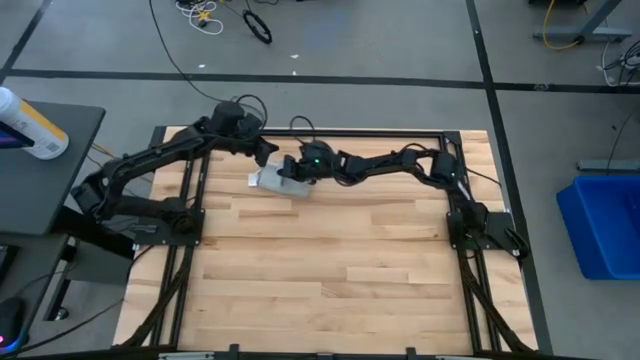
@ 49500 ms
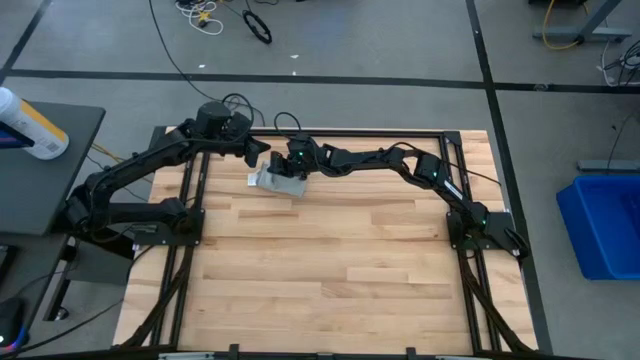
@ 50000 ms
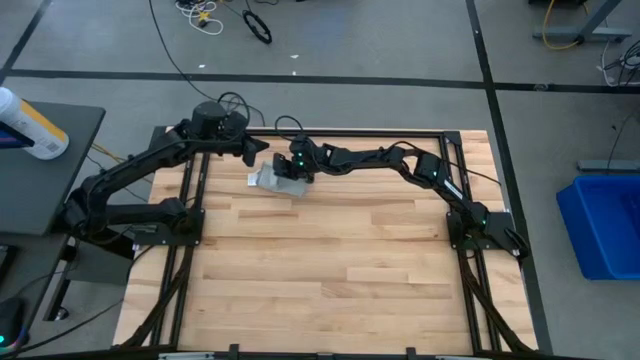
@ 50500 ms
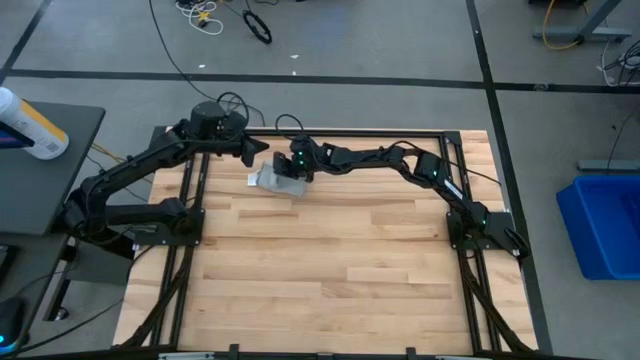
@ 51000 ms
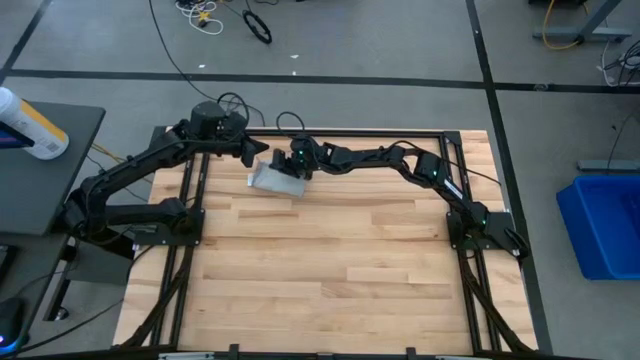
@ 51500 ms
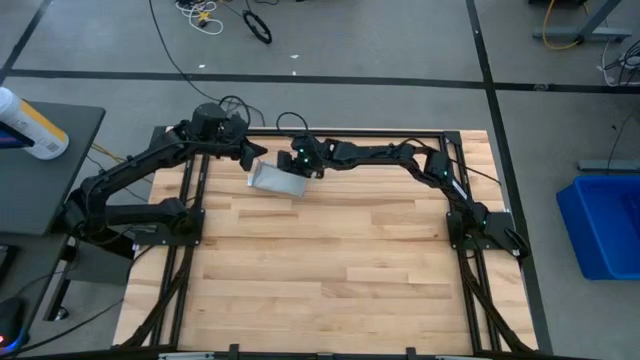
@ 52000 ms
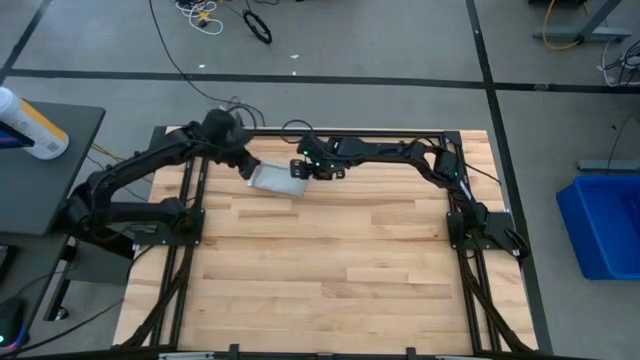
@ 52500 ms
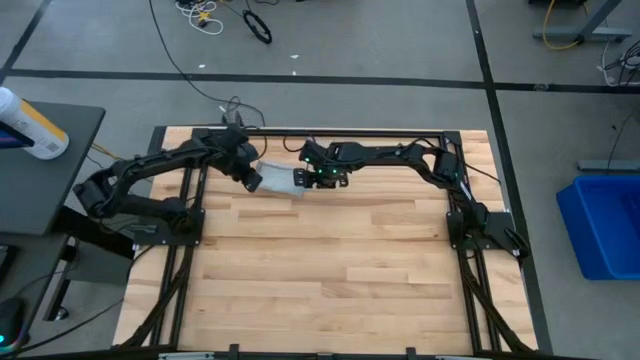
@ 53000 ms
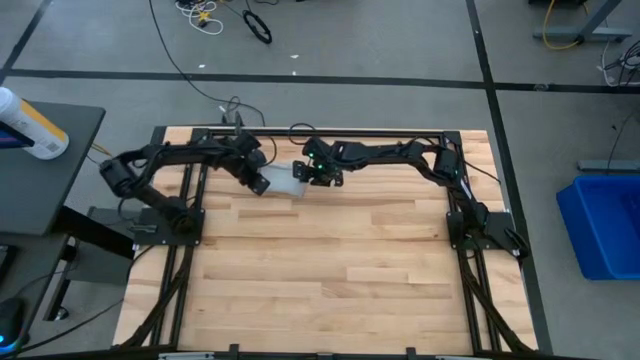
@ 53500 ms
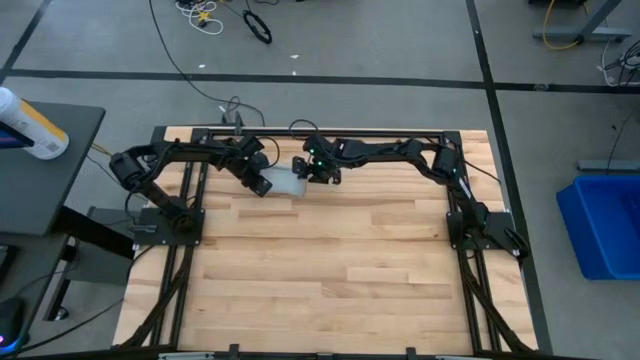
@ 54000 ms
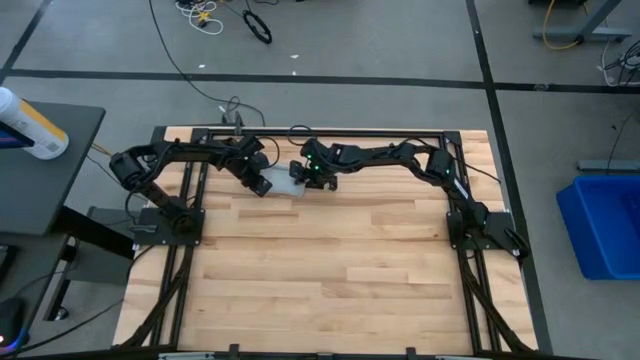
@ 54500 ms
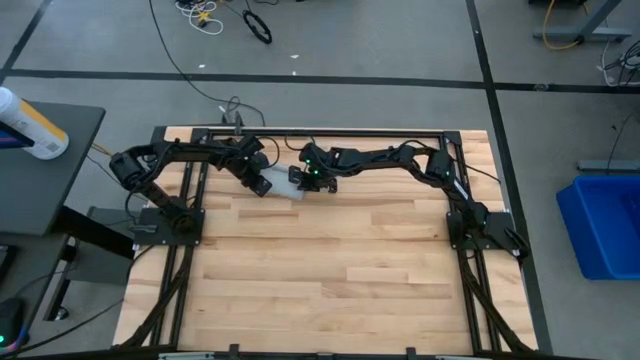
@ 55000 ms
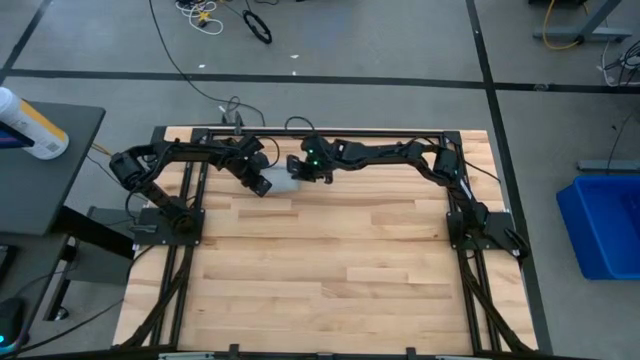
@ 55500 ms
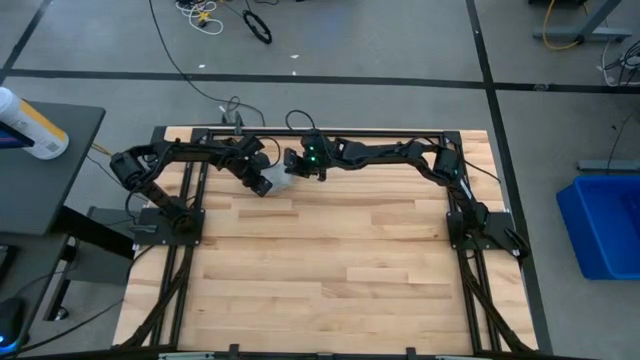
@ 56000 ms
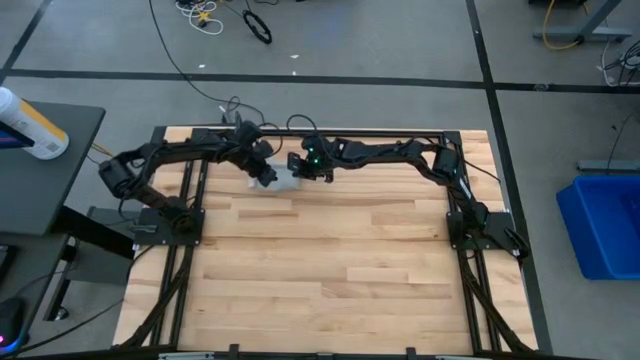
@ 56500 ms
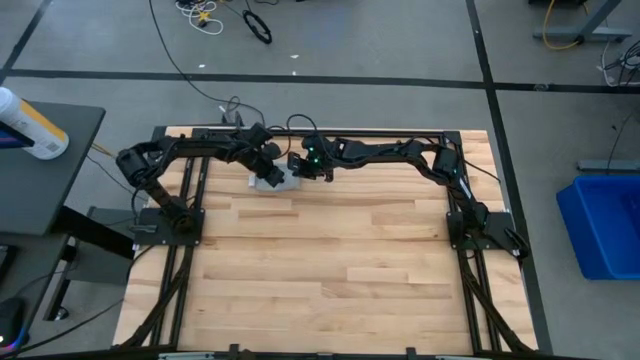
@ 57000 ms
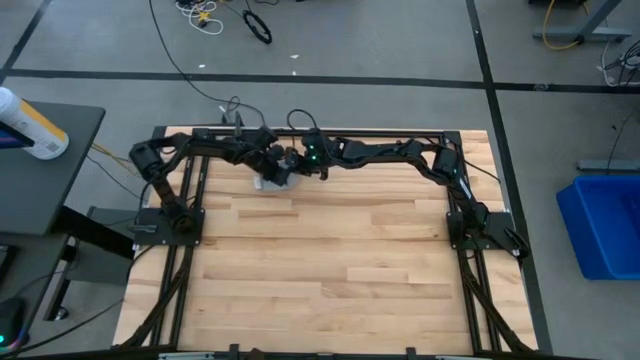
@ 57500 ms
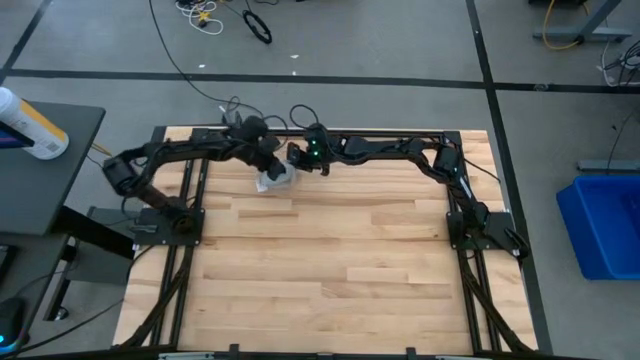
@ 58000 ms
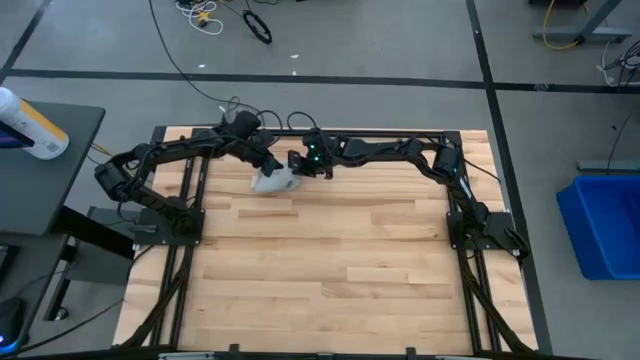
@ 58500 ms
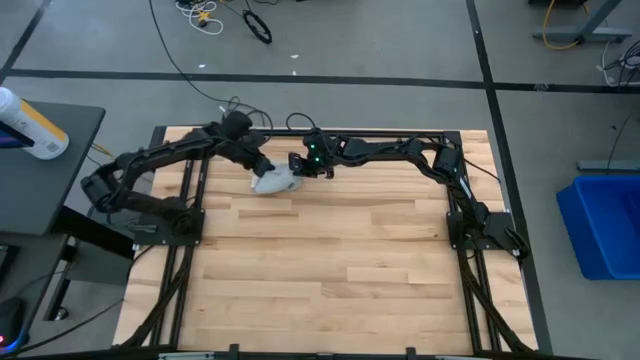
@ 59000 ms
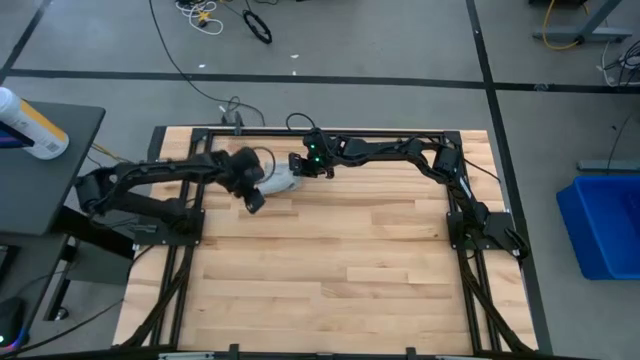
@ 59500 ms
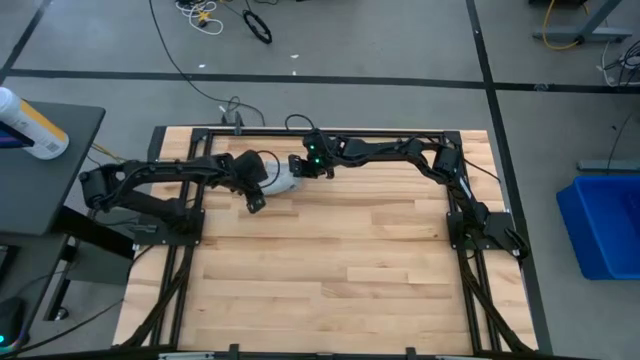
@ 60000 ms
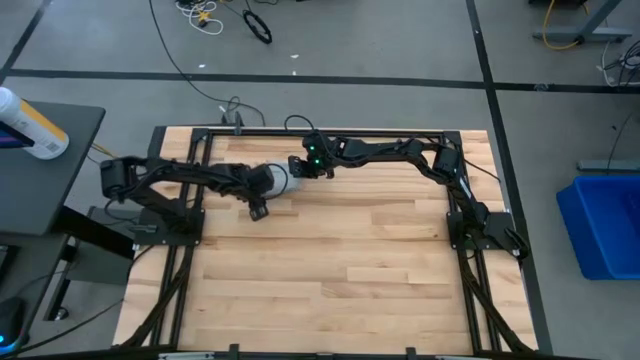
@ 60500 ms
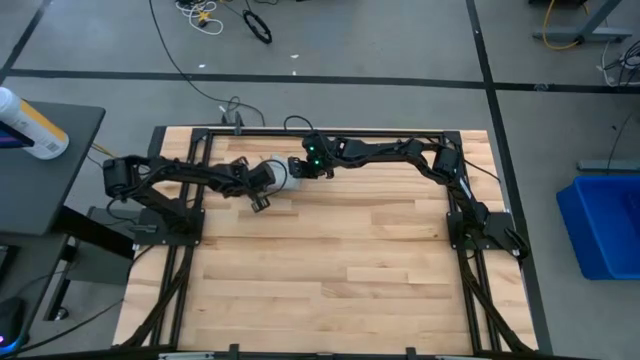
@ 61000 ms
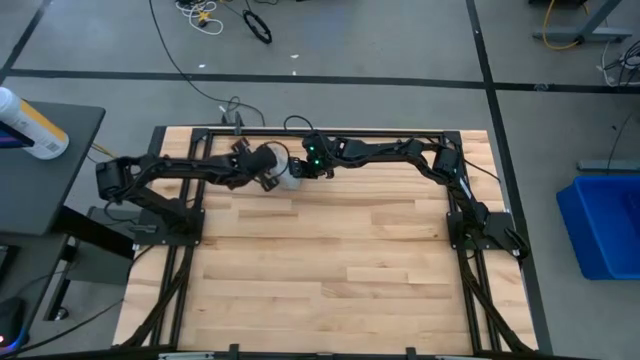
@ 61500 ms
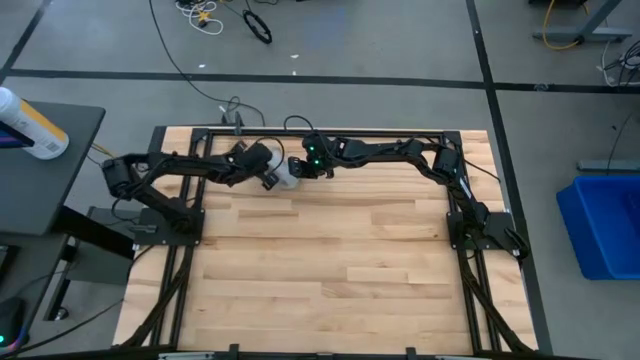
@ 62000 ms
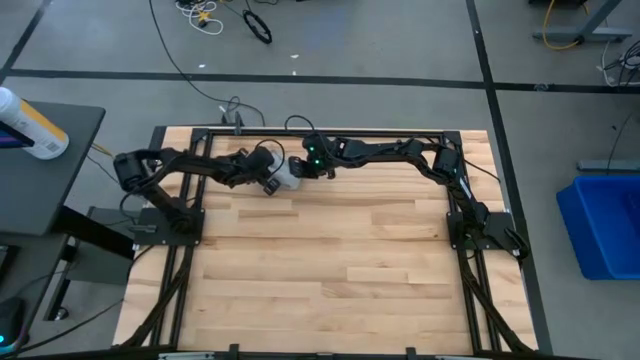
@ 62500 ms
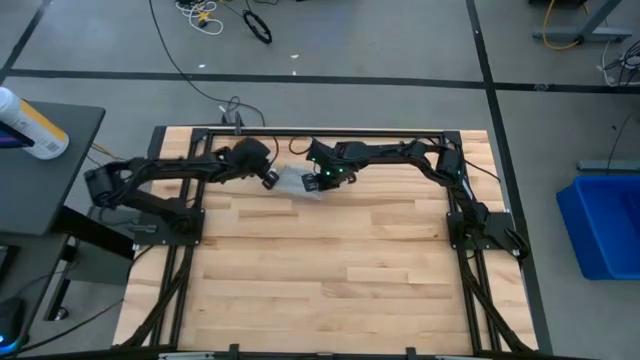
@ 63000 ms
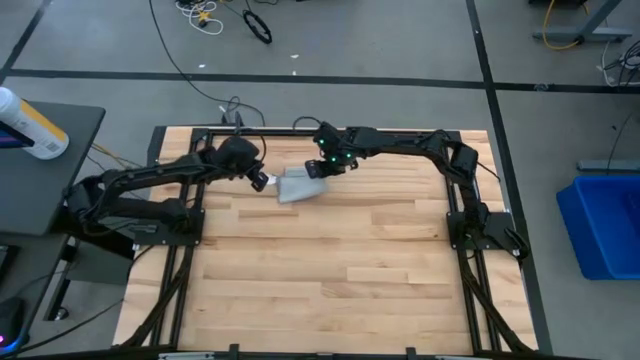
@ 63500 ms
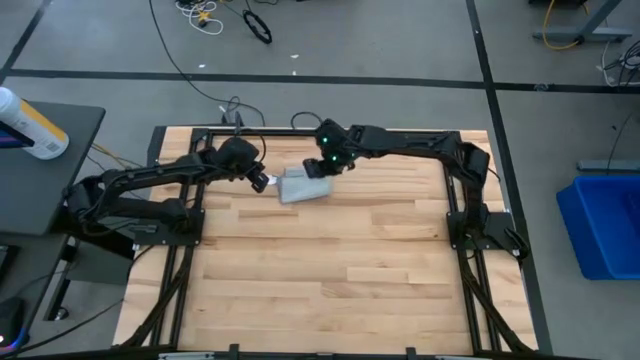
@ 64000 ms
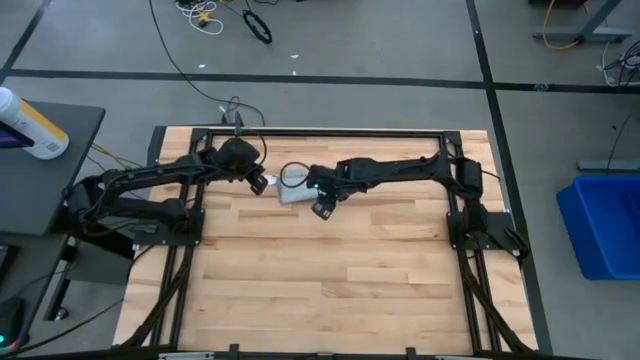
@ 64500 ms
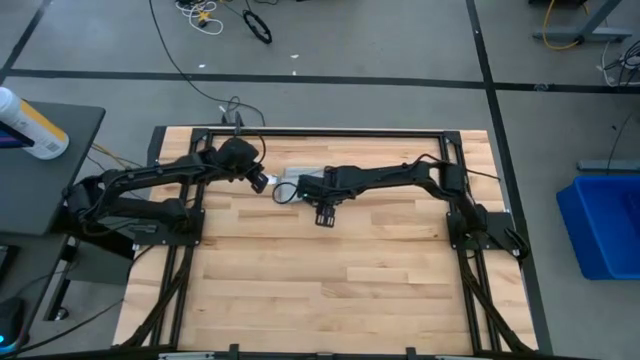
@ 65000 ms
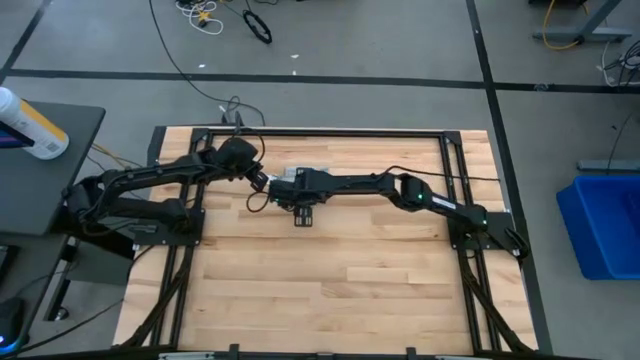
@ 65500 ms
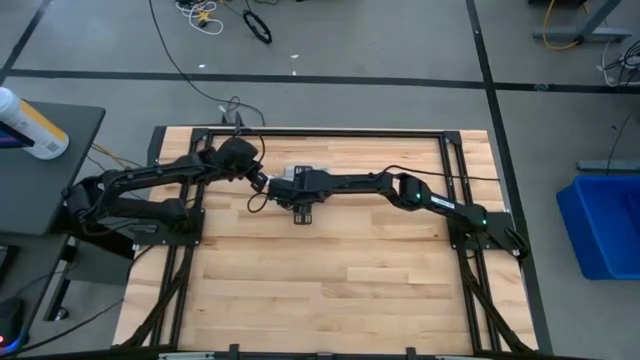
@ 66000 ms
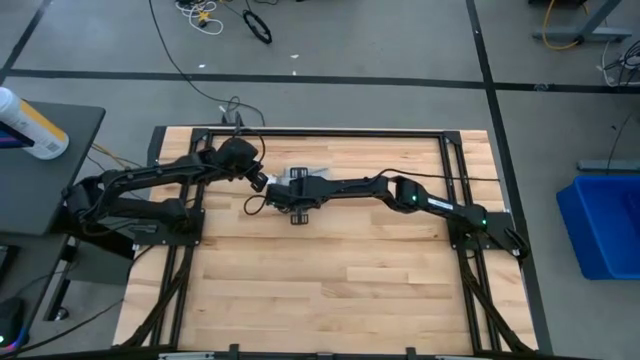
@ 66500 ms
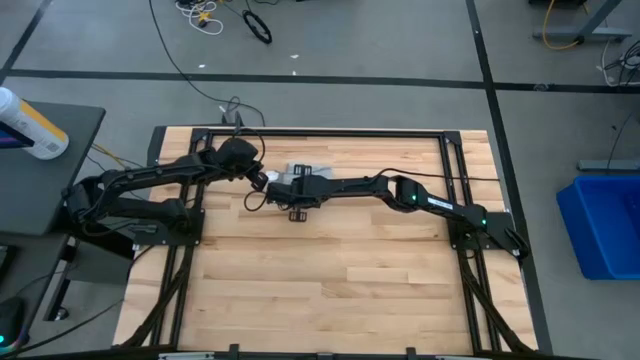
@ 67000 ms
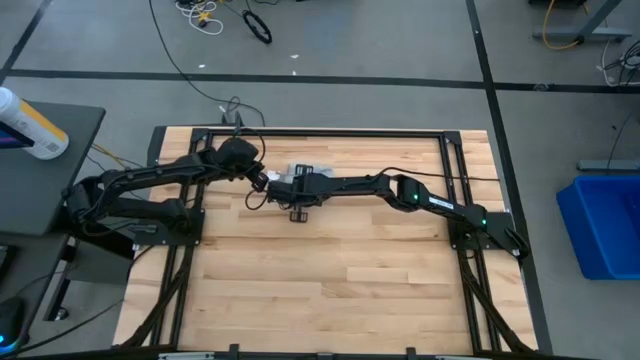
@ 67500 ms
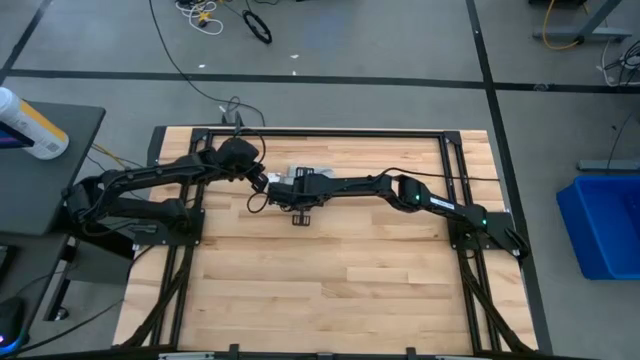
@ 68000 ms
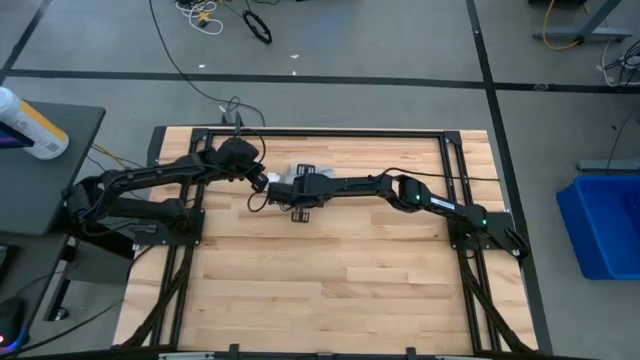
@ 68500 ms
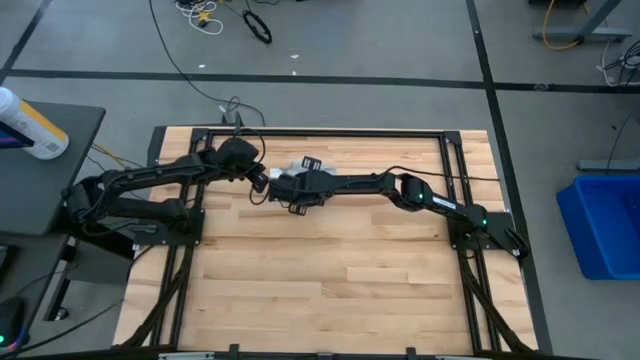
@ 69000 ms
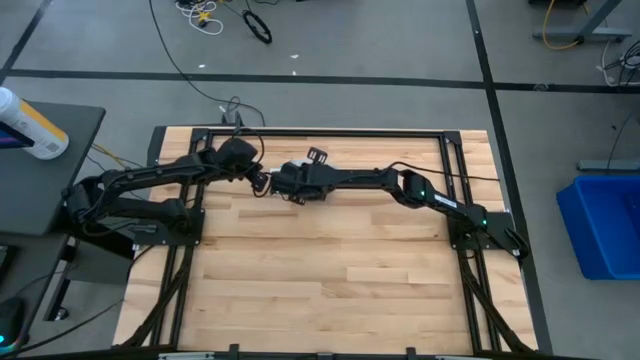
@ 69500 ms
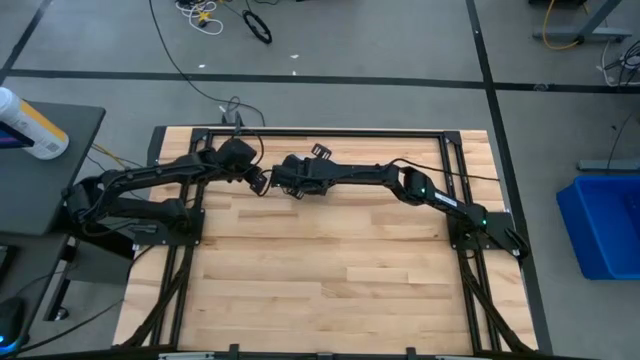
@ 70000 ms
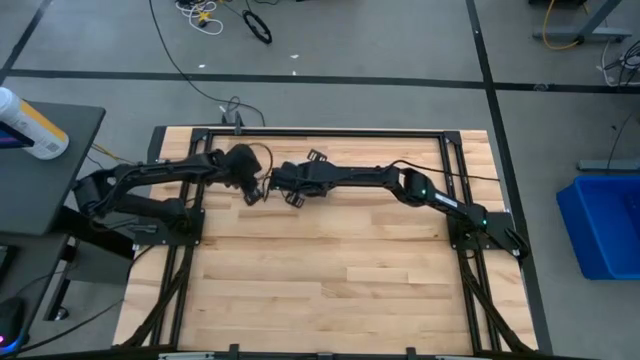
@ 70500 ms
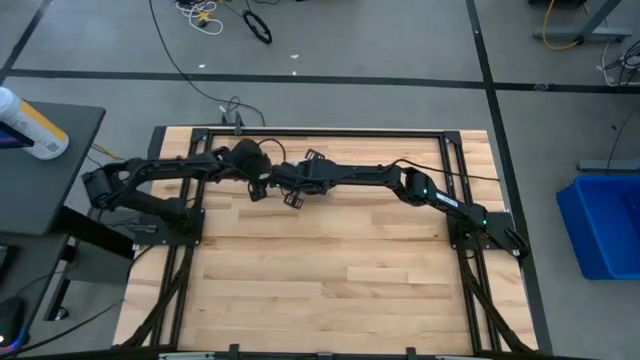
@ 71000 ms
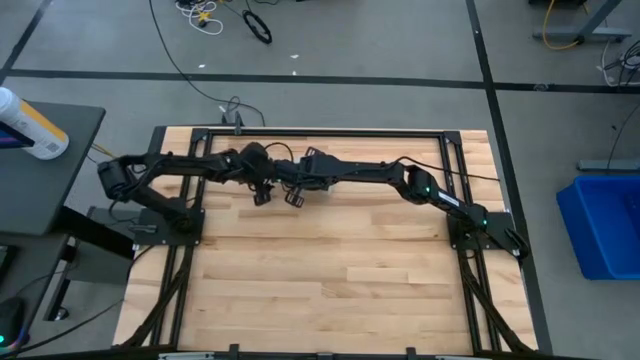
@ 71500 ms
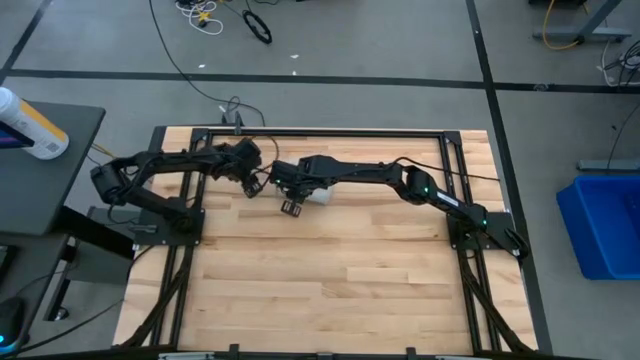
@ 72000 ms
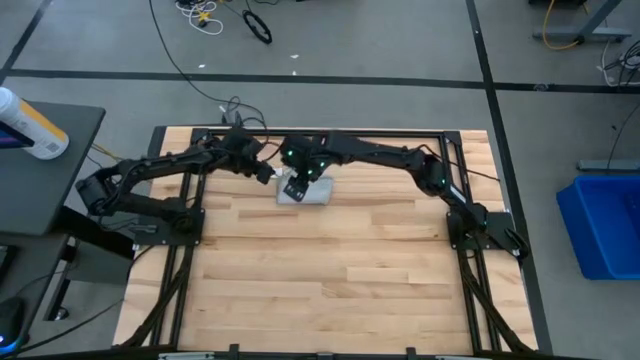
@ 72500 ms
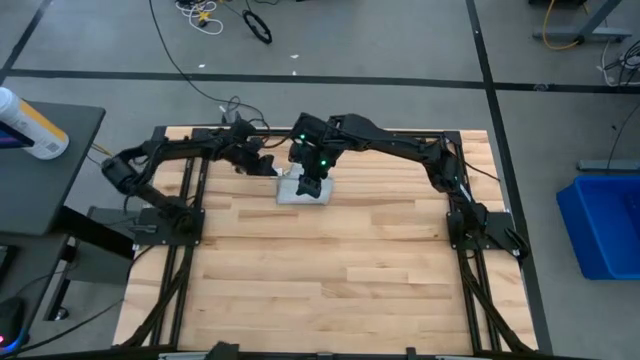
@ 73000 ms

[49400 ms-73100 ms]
Task: Fold microfiber towels
Fold the gray towel
